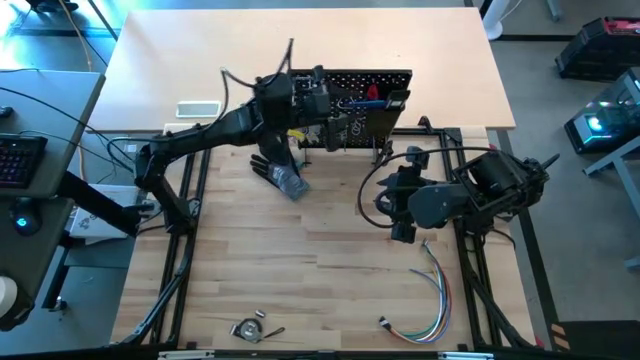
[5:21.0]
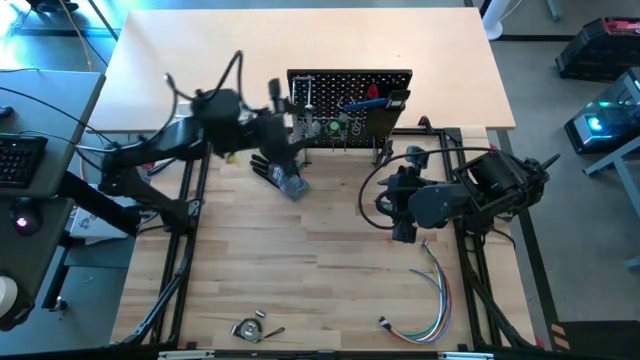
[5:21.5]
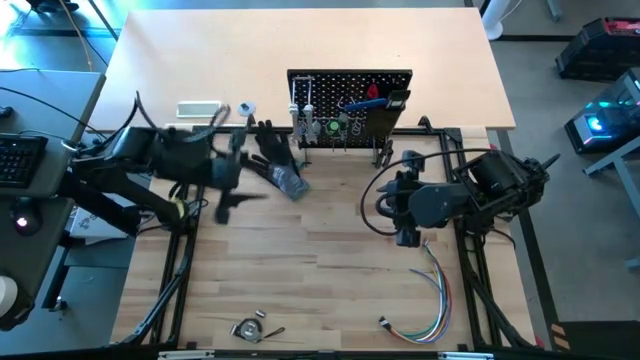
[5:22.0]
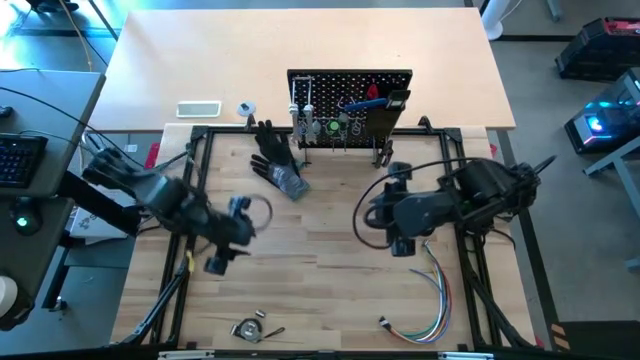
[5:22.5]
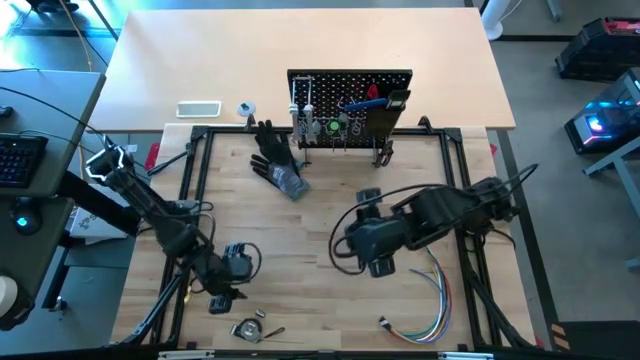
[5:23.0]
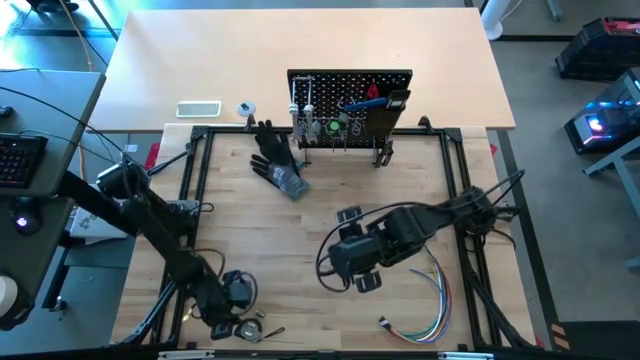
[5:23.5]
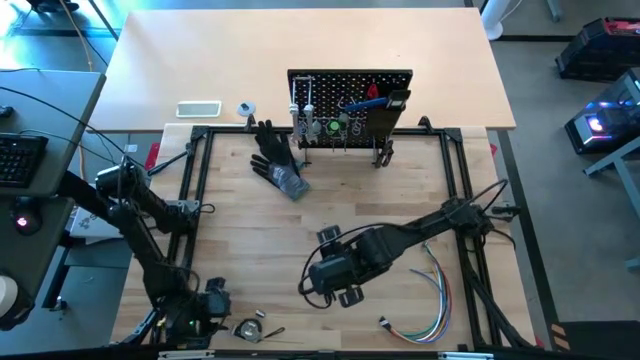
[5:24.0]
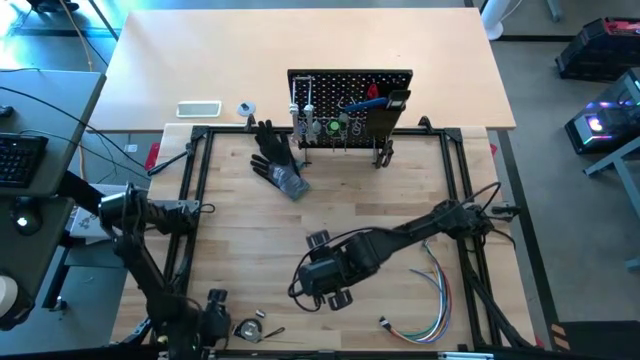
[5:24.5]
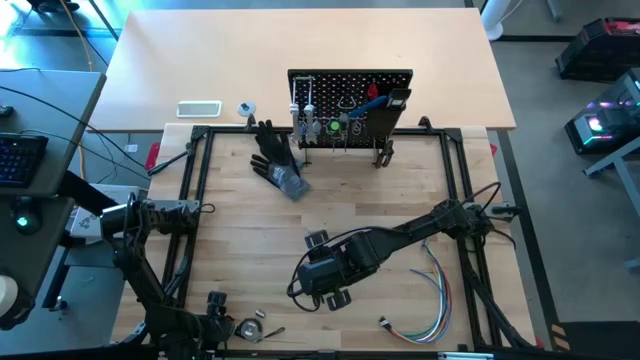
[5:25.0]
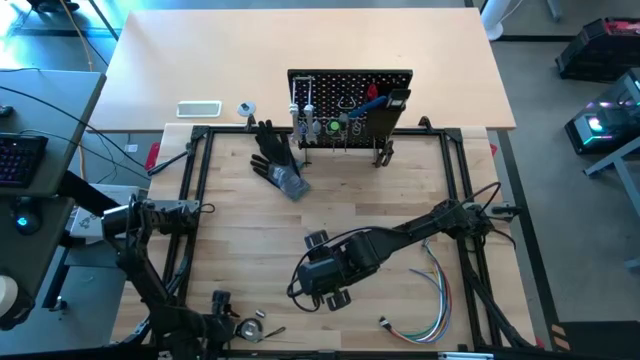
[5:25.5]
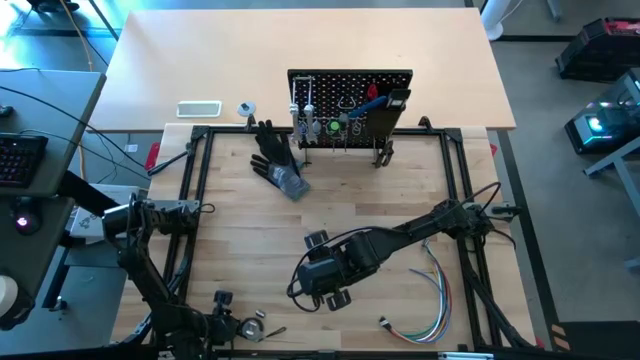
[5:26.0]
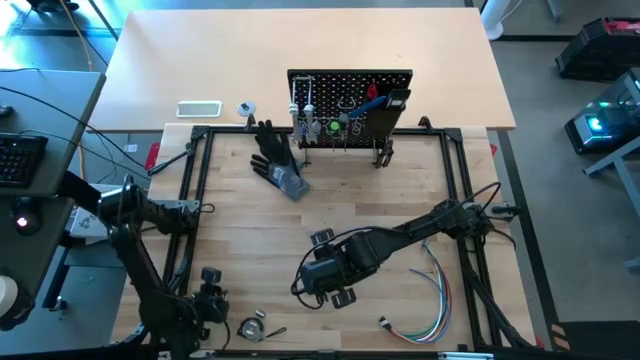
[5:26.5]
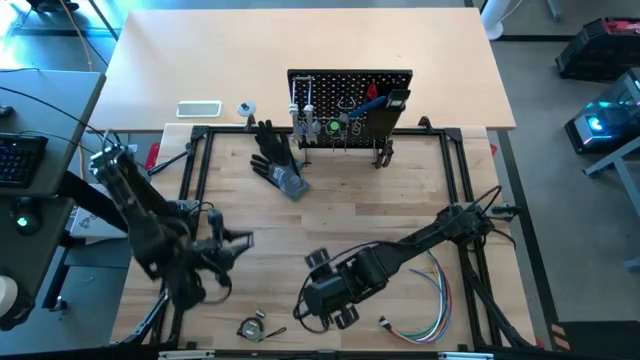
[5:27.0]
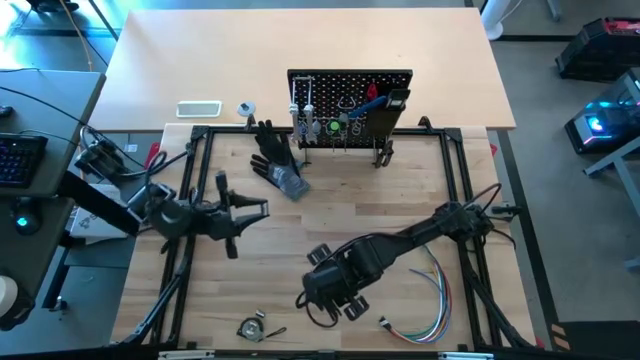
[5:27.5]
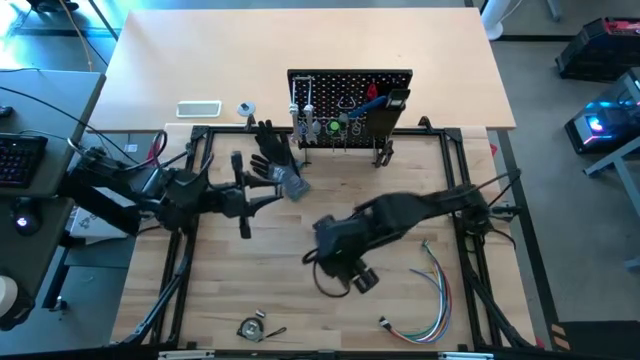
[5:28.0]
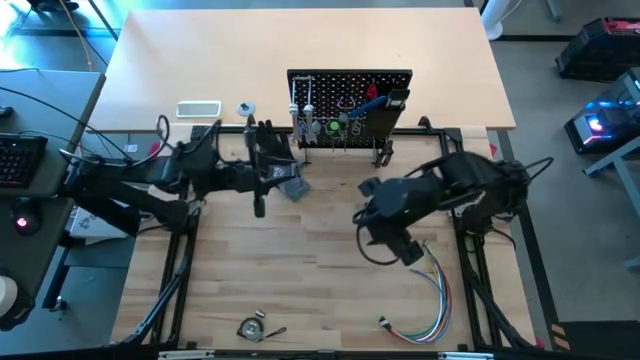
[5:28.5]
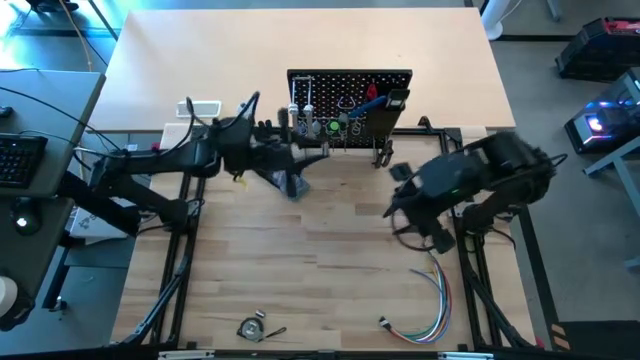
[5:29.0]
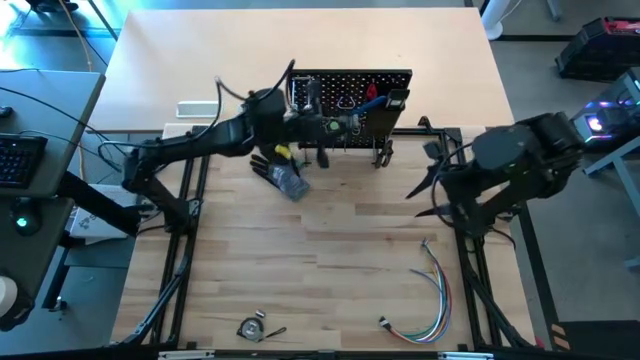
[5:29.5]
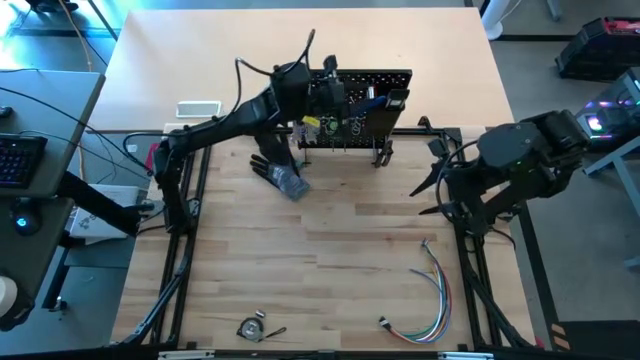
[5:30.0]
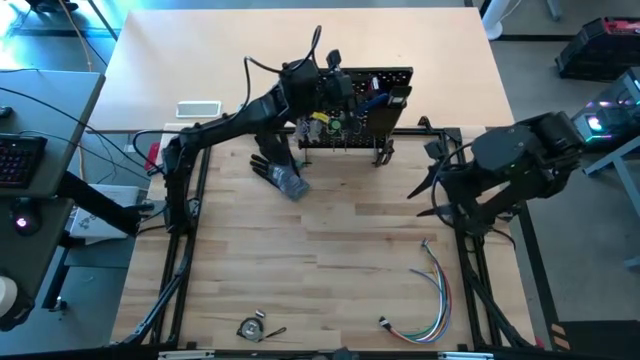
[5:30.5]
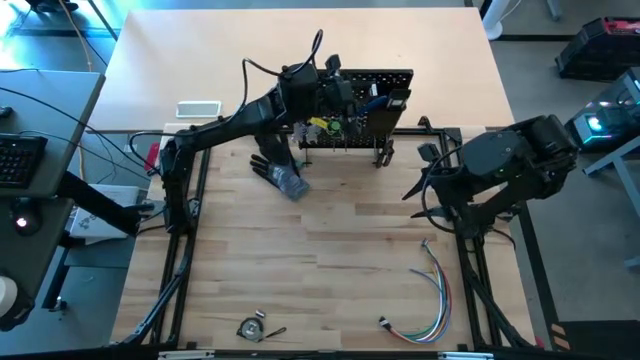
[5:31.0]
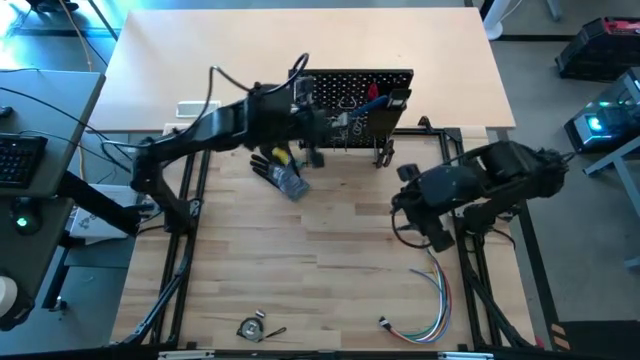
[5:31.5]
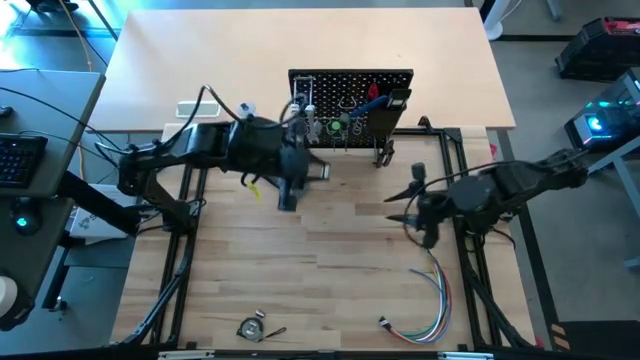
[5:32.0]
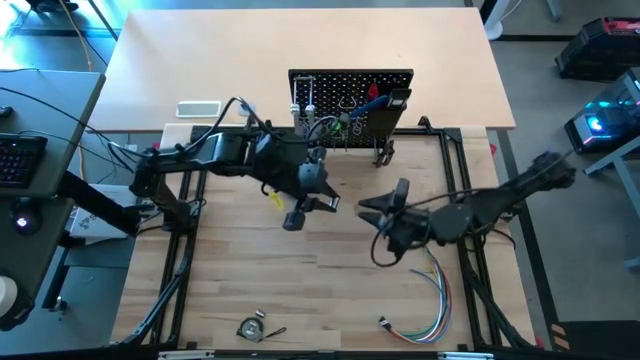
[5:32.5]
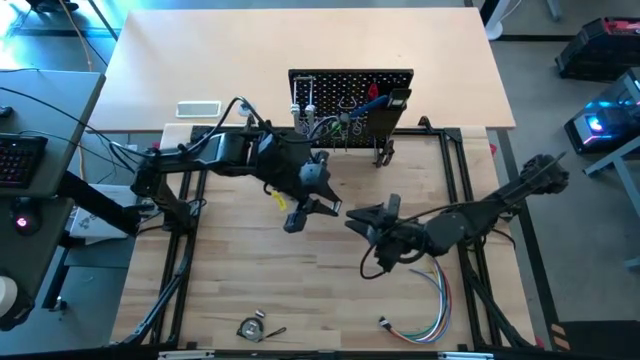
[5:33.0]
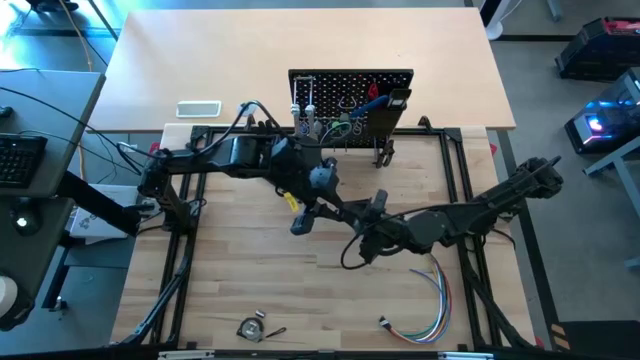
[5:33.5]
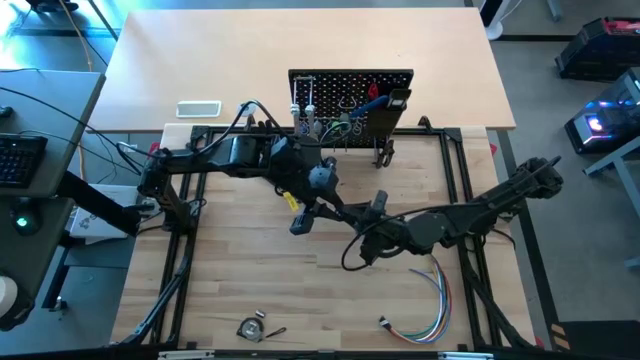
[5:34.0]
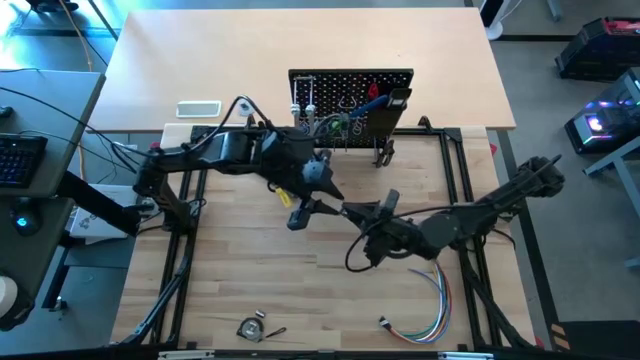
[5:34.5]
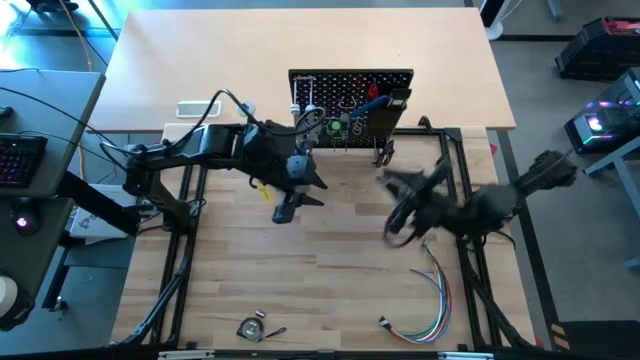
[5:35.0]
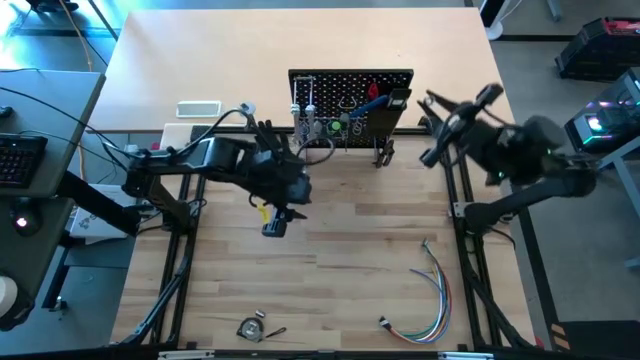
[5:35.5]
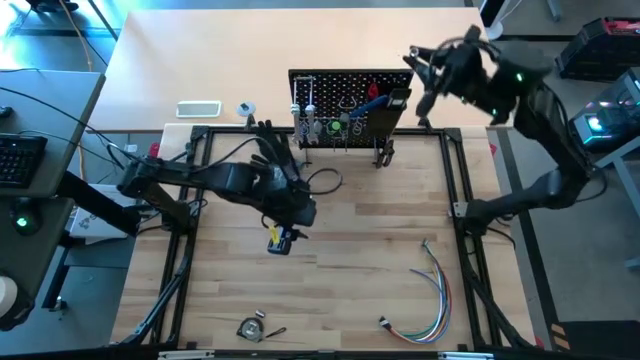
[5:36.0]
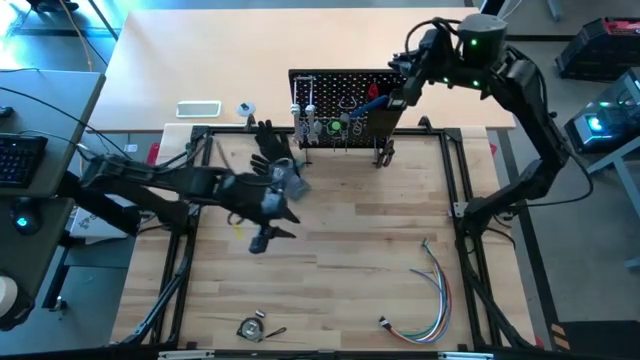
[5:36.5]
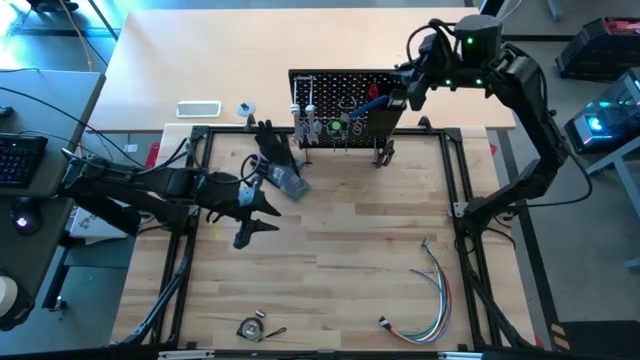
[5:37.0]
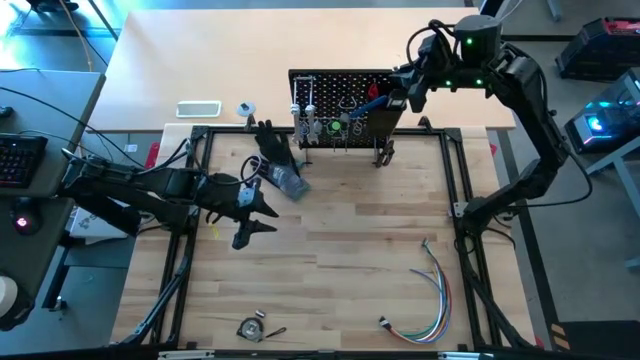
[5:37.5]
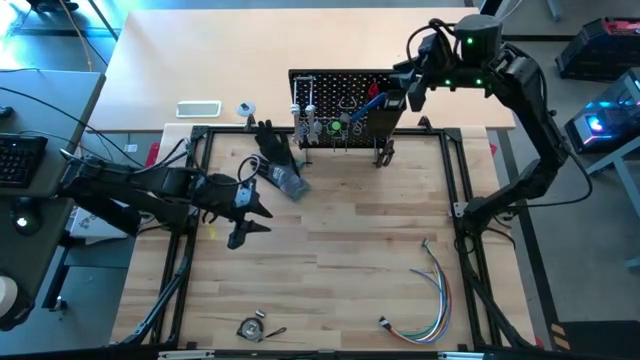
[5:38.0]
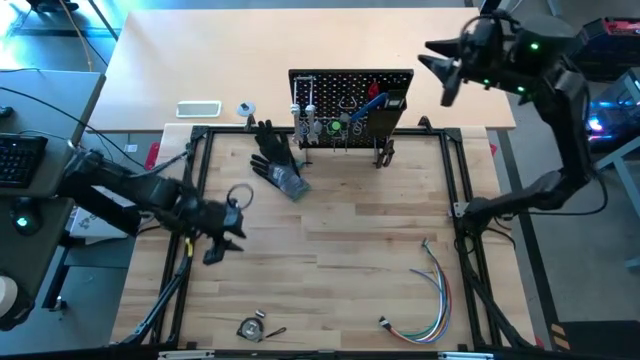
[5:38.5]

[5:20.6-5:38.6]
Task: Hang tools onto peg board
Put the silver socket into the black bin on the pegboard
